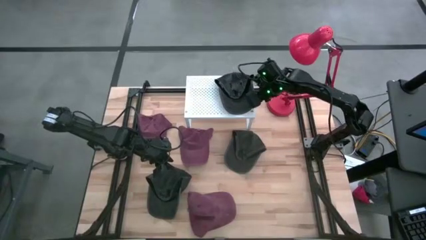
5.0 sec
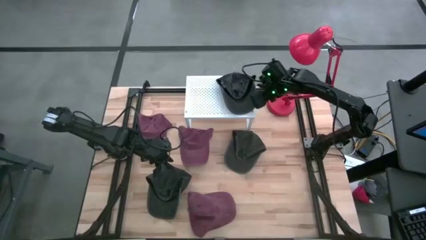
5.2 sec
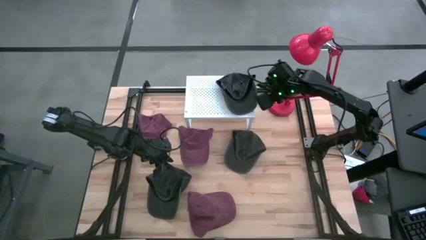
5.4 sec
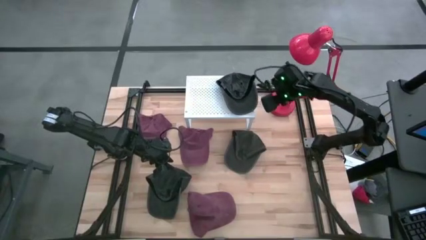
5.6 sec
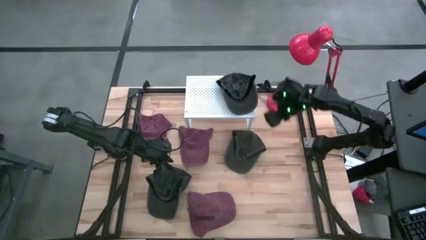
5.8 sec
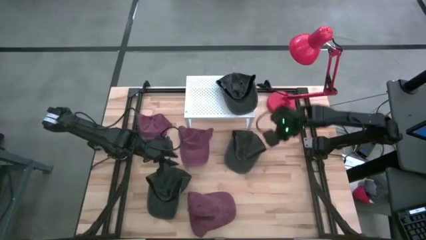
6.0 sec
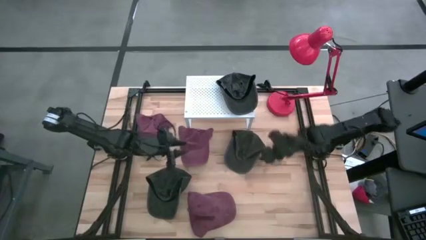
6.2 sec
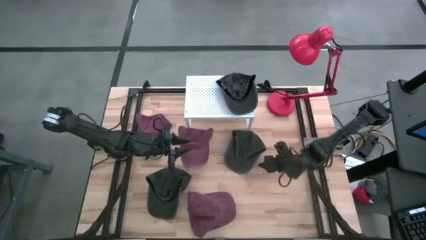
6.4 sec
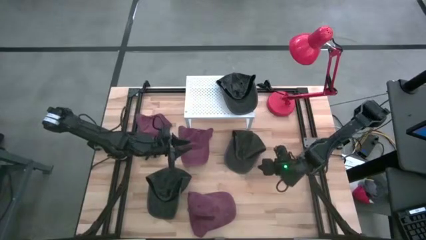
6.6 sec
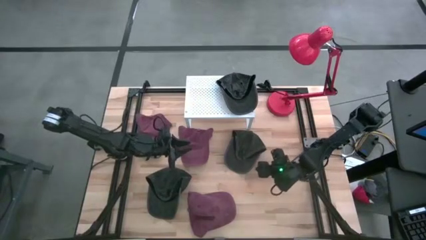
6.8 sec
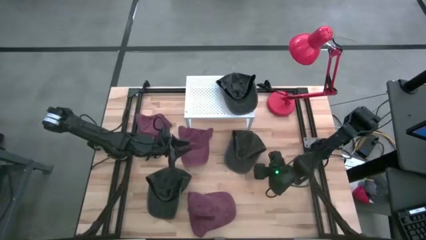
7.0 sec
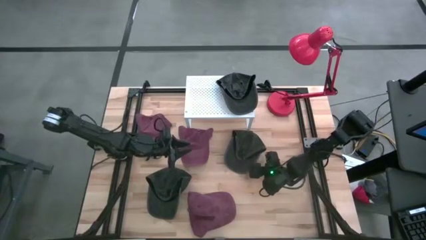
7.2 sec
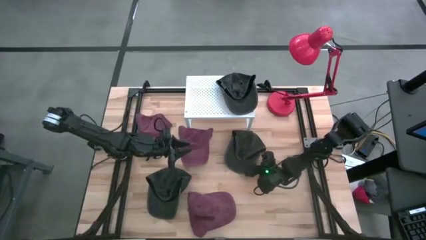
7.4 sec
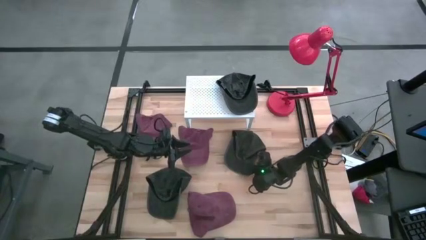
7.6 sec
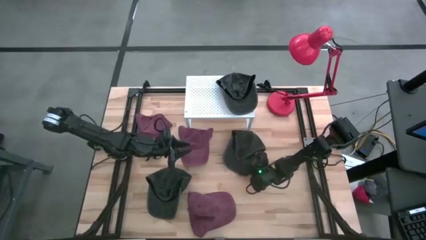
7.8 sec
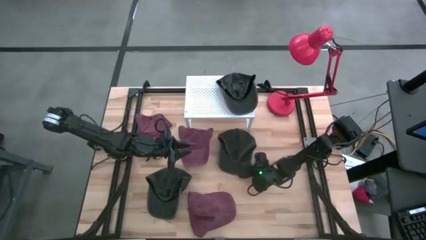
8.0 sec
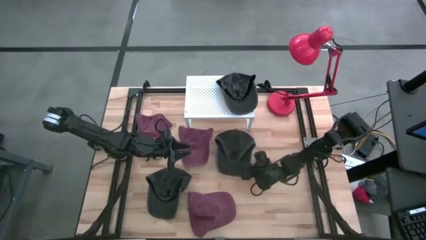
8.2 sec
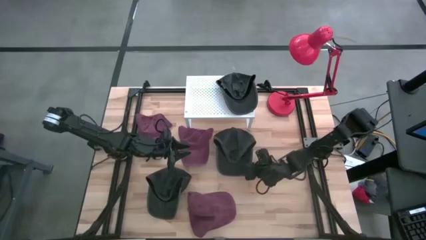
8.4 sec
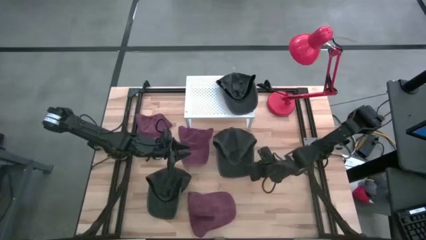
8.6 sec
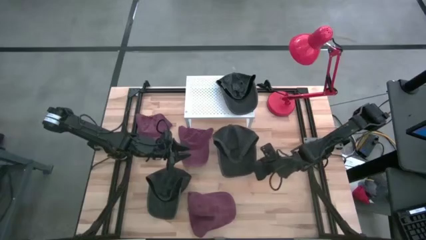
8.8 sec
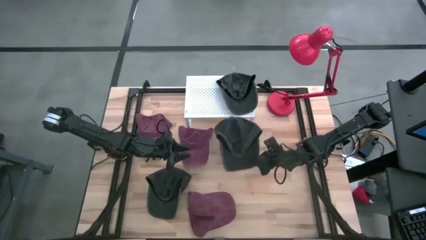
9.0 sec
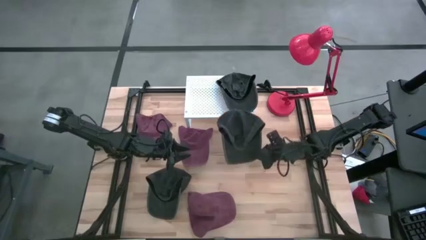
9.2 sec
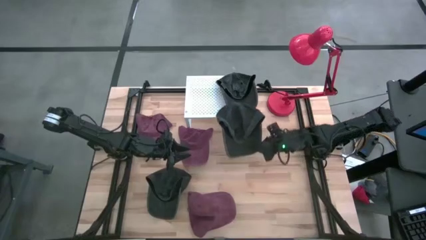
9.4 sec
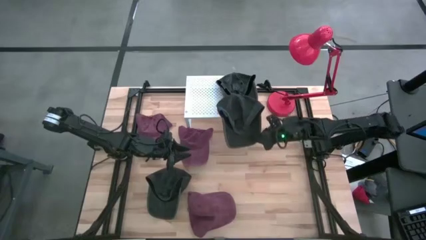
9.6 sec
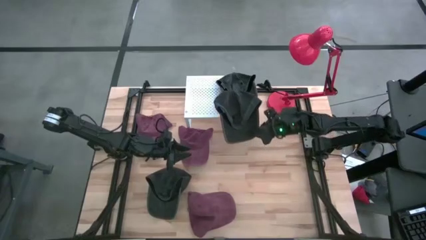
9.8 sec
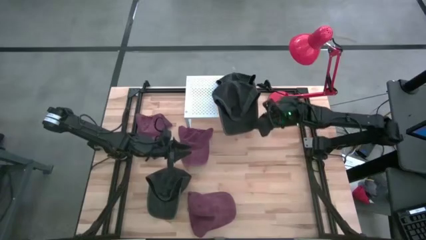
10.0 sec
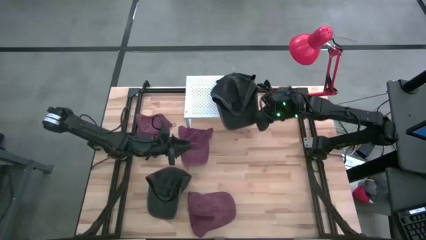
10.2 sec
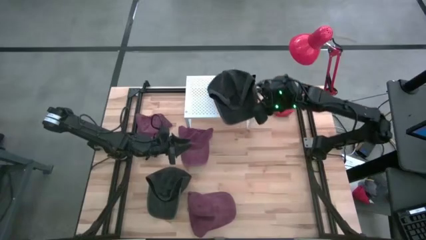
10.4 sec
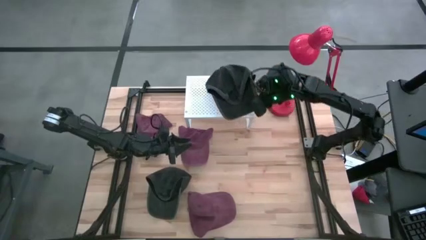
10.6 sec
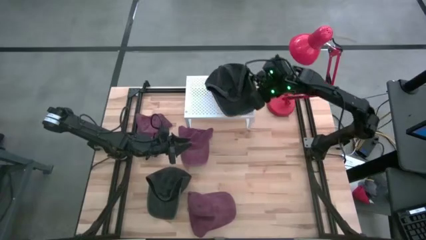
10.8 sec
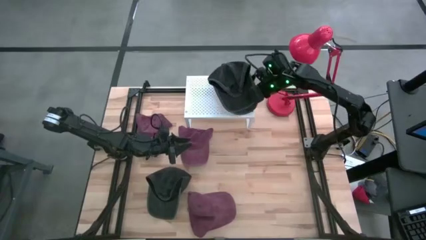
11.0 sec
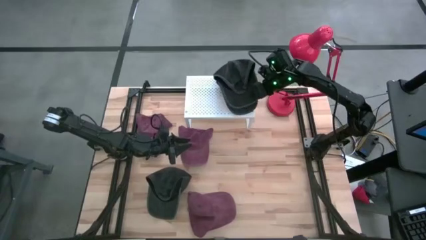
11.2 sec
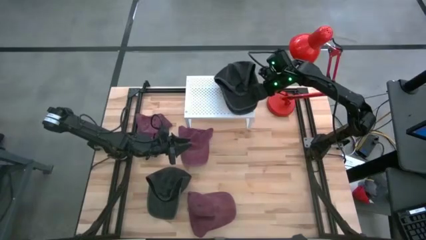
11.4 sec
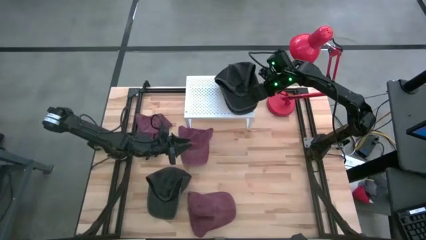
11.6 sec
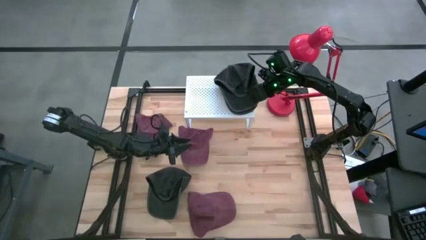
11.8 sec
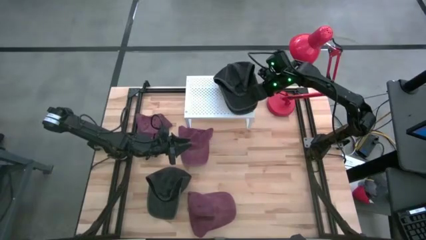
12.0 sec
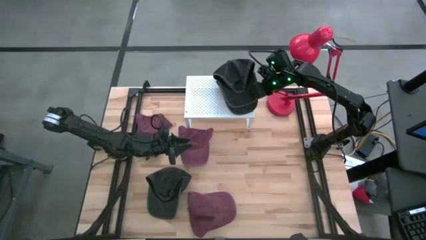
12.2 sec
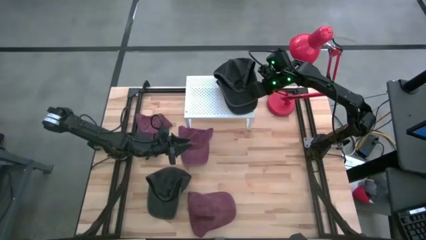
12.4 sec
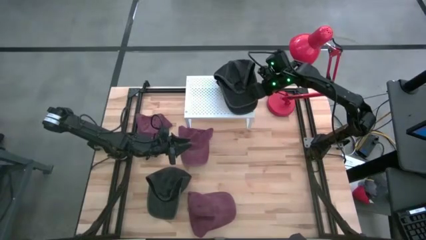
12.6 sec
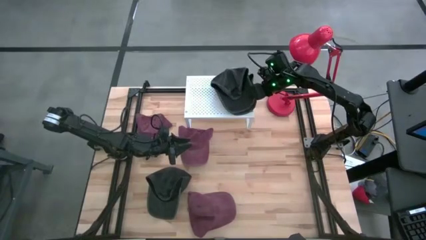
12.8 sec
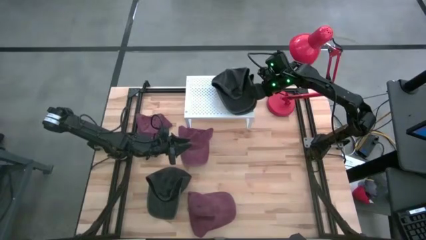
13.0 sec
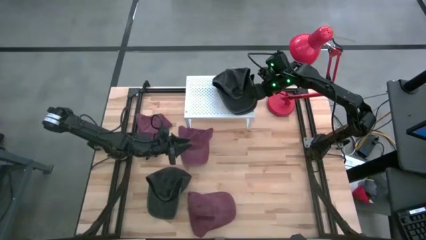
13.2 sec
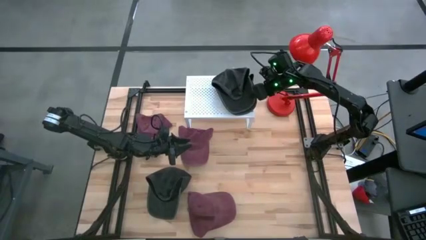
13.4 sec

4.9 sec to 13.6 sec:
Task: Pick & Place hat
Stack the top black cap on the black cap on the shelf

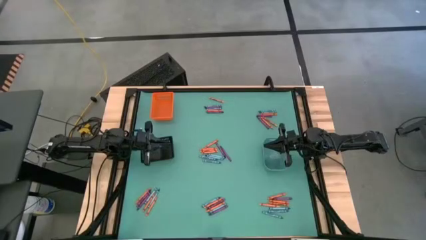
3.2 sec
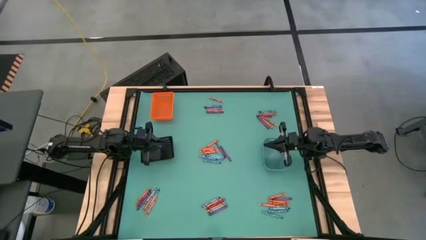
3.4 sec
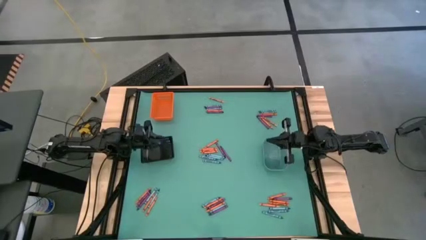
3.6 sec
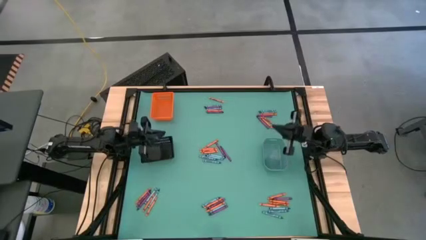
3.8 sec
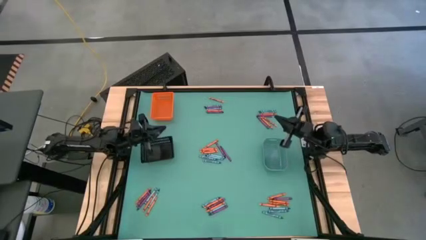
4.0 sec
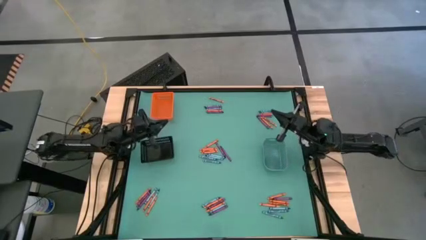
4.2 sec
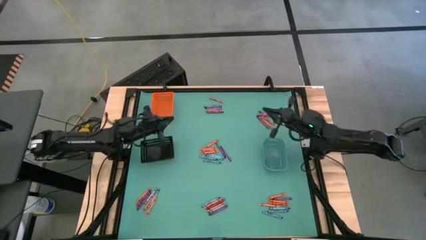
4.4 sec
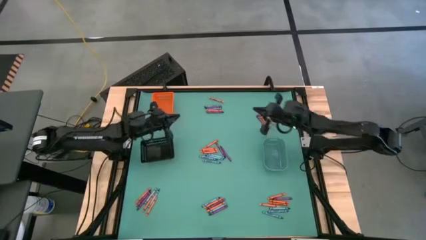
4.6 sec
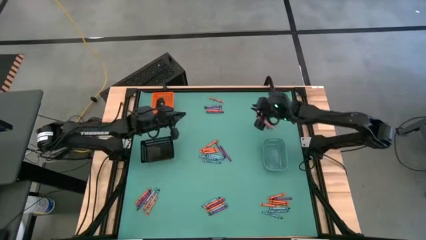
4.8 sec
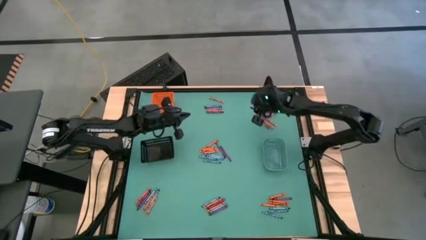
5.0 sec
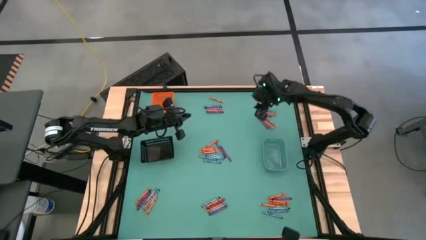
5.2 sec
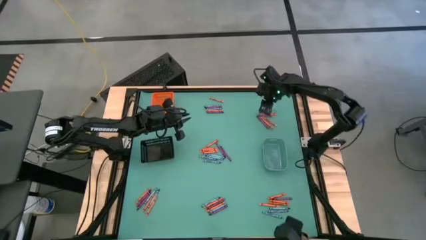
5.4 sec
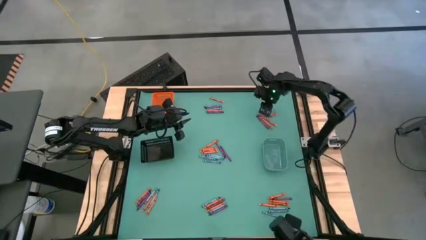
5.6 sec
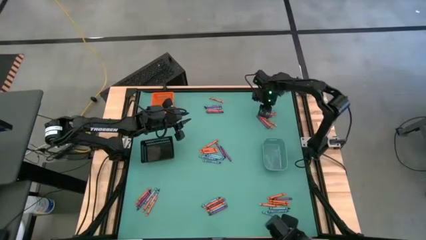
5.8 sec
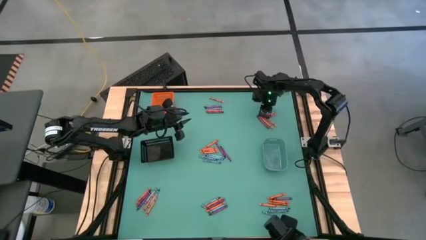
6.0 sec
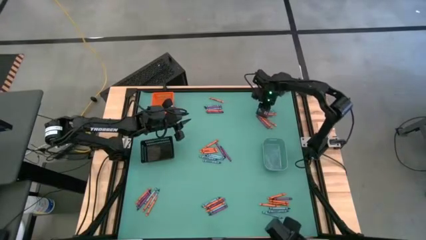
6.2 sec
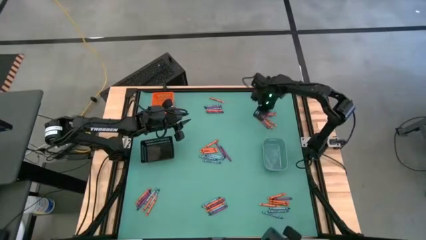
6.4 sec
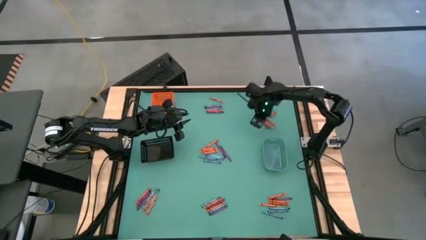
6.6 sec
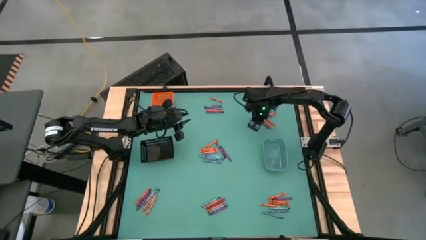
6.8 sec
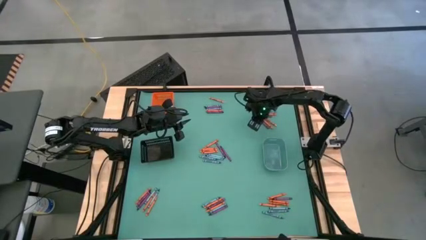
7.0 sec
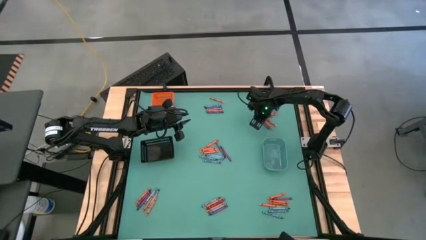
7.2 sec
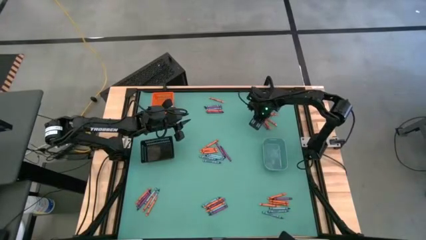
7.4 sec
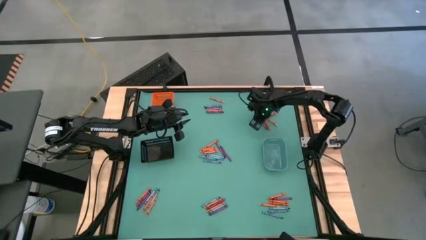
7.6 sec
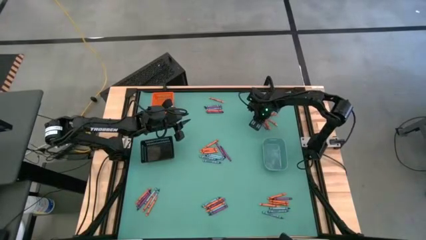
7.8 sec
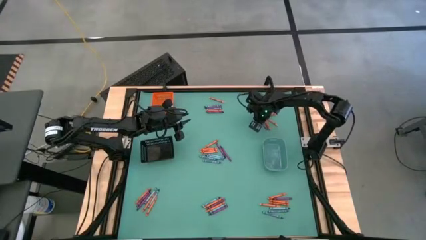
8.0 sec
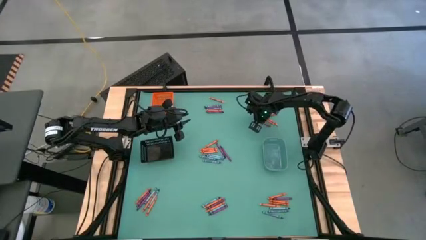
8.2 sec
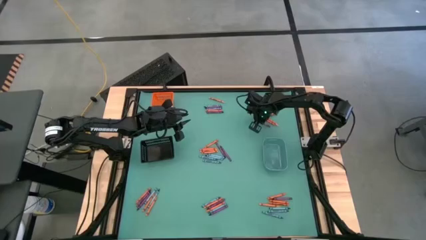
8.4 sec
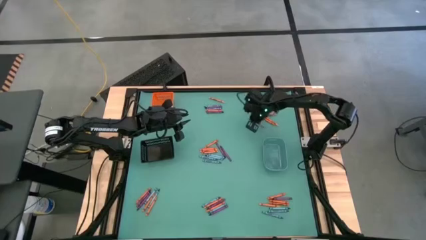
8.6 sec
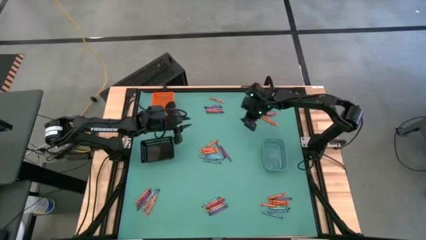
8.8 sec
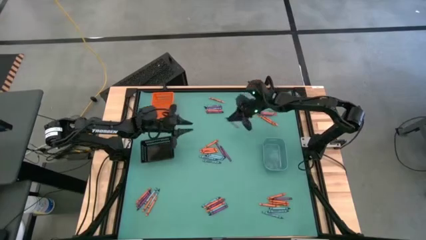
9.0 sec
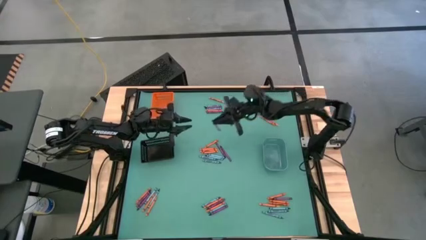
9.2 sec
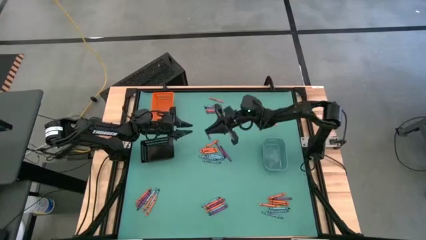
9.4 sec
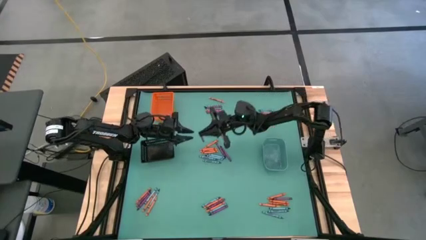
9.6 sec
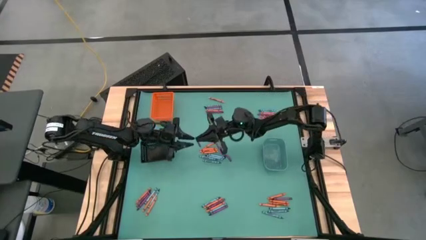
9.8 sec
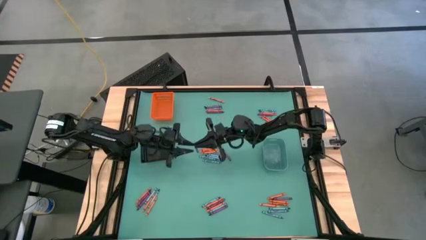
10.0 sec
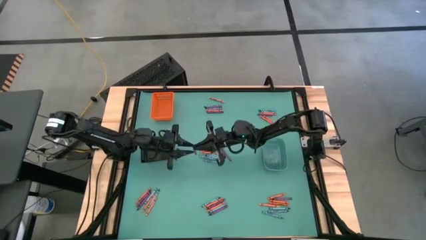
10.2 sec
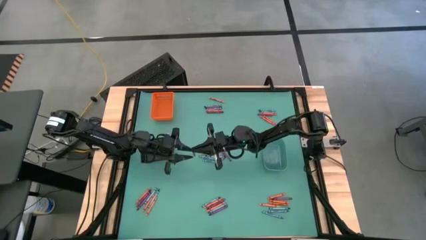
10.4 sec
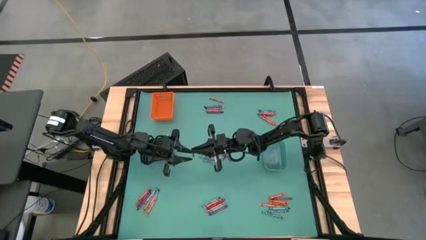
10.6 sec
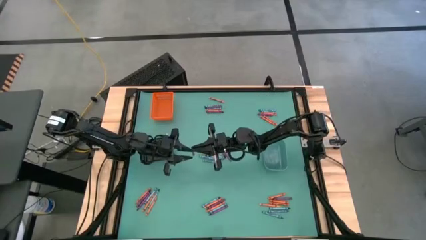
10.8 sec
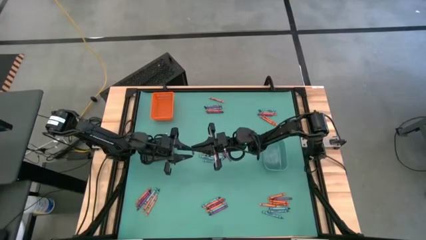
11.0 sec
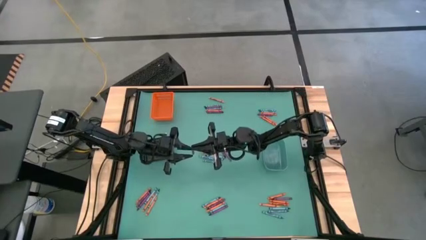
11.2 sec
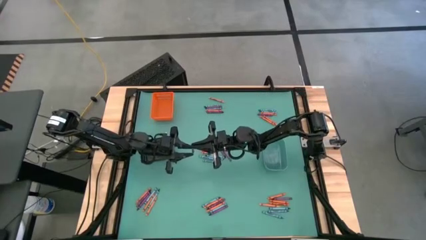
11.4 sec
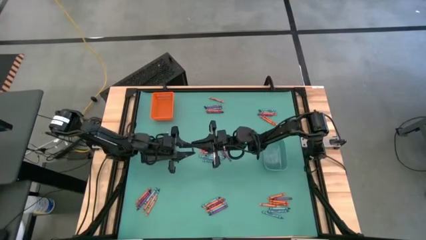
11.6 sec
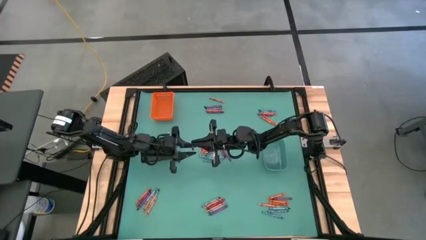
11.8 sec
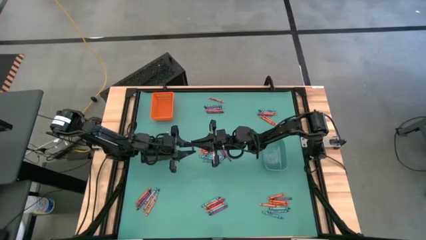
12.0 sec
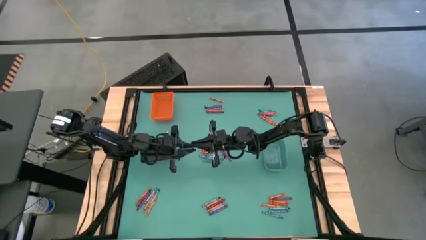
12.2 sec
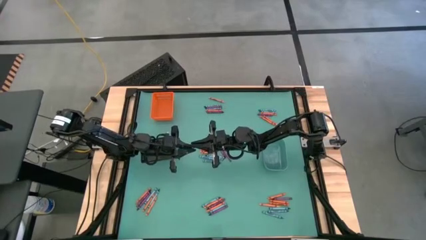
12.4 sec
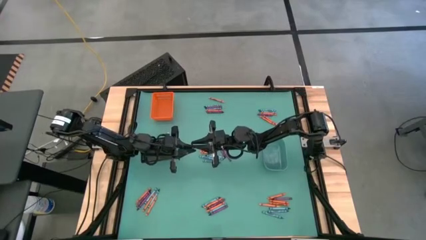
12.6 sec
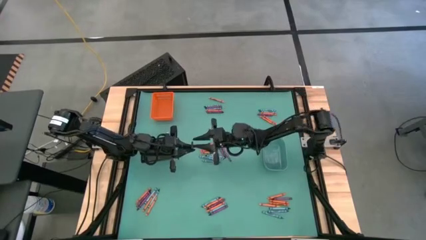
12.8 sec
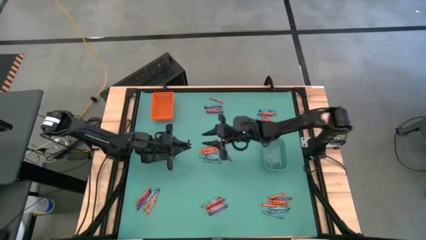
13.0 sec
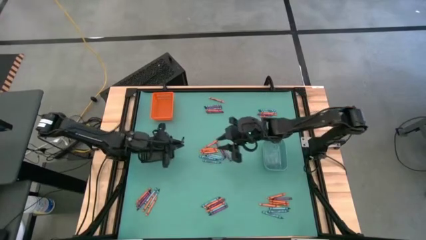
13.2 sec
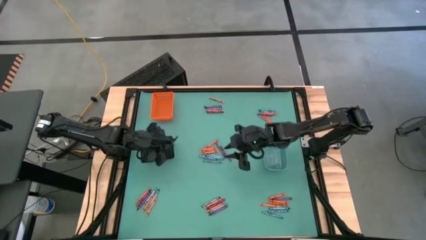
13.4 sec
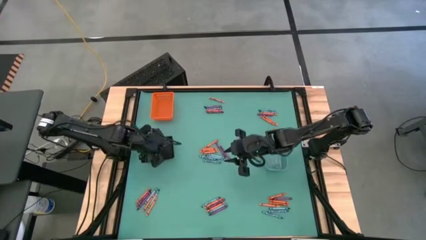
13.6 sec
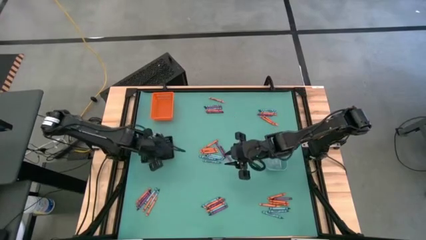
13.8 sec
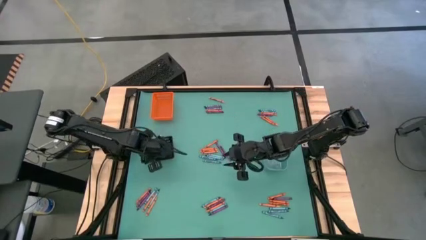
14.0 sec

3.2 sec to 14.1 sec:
Task: Sort crayons
Put the violet crayon into the black bin
